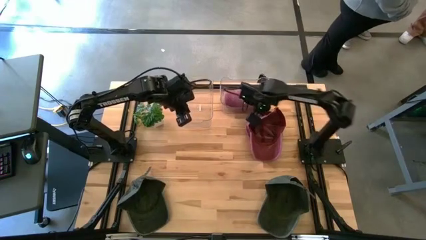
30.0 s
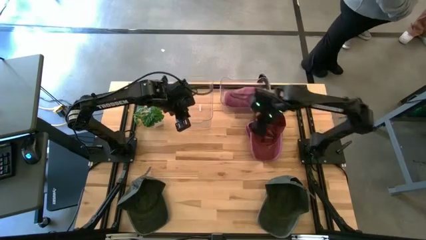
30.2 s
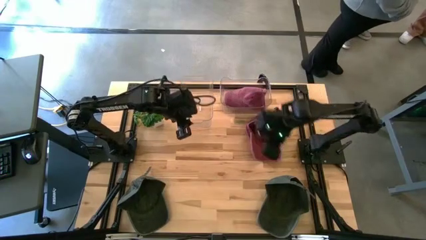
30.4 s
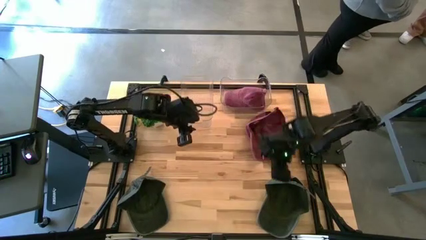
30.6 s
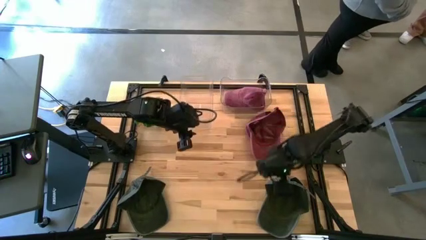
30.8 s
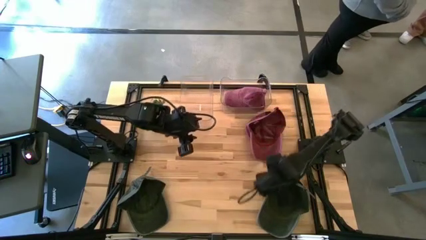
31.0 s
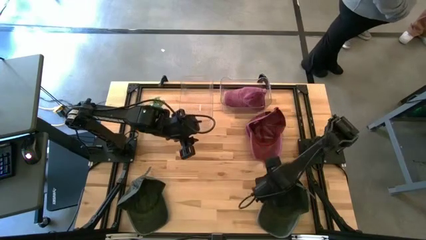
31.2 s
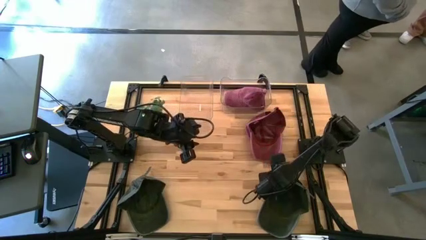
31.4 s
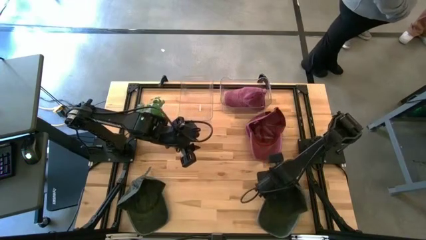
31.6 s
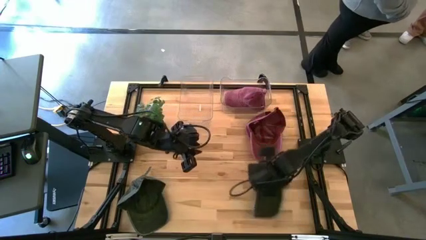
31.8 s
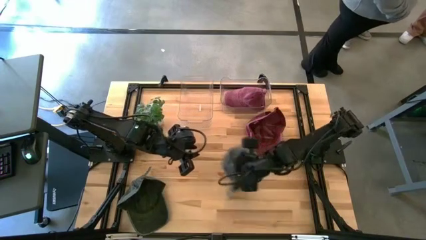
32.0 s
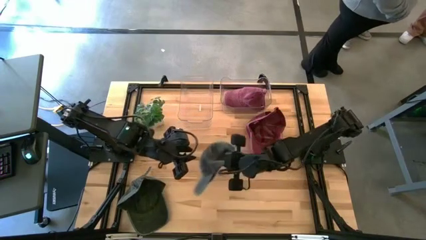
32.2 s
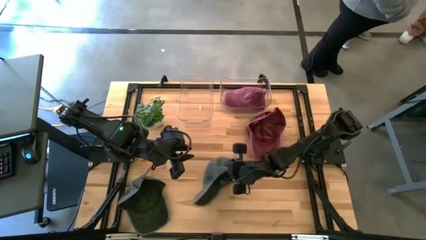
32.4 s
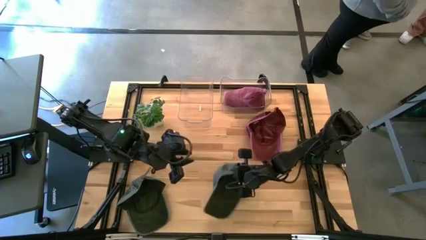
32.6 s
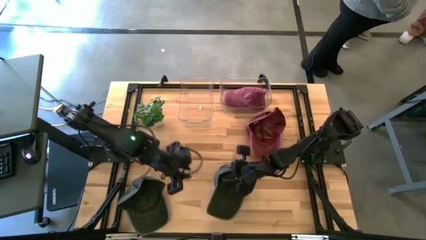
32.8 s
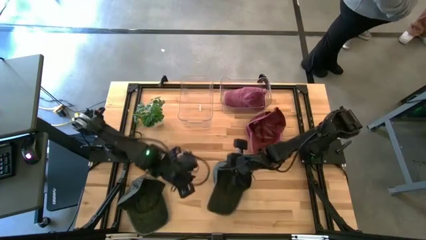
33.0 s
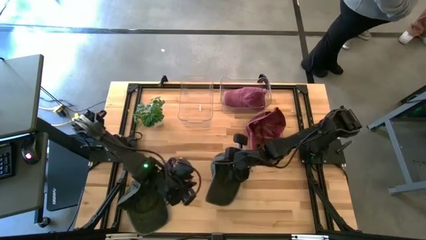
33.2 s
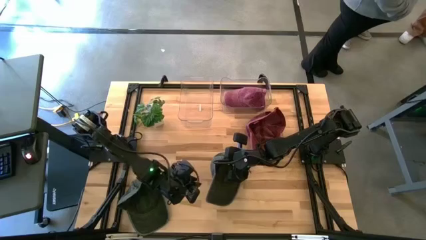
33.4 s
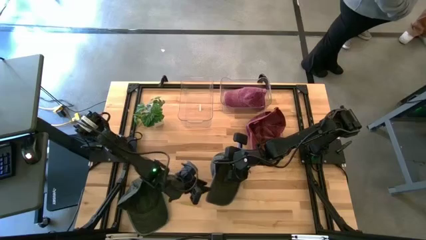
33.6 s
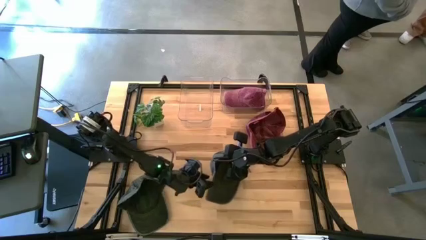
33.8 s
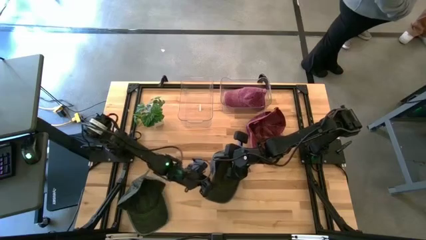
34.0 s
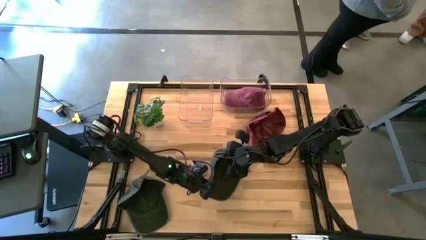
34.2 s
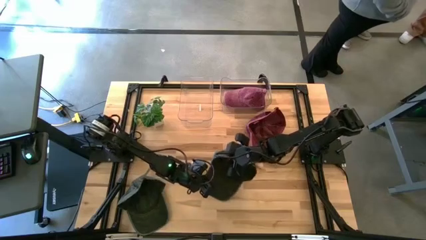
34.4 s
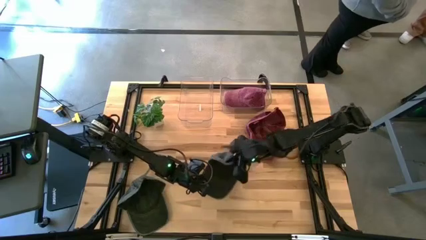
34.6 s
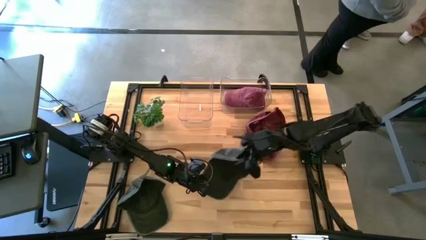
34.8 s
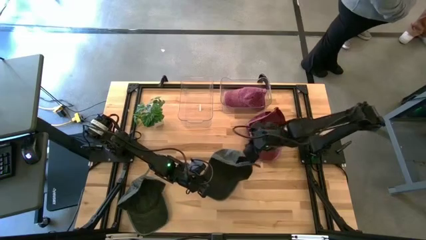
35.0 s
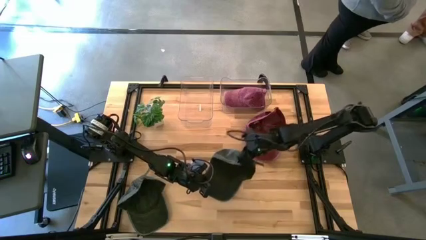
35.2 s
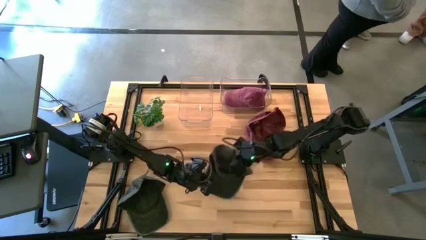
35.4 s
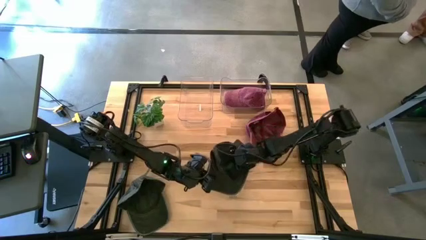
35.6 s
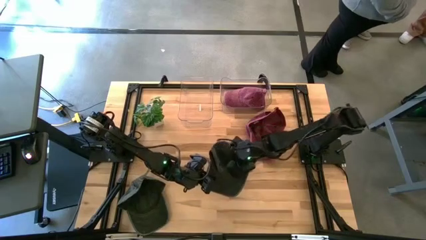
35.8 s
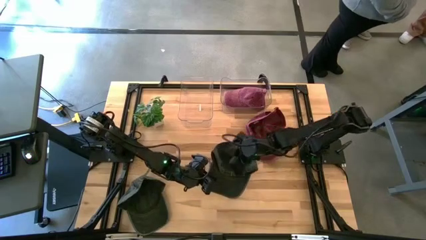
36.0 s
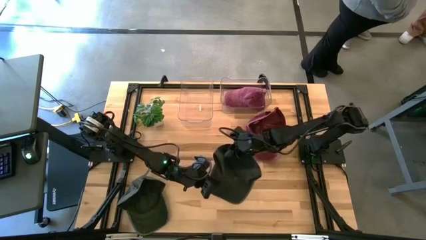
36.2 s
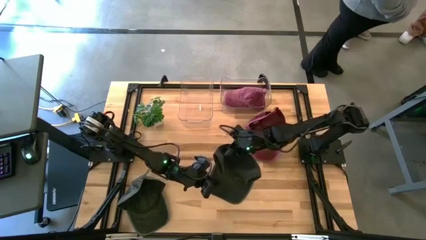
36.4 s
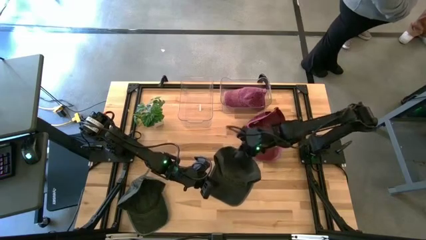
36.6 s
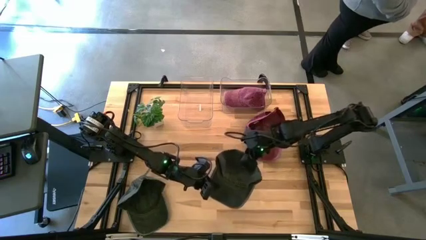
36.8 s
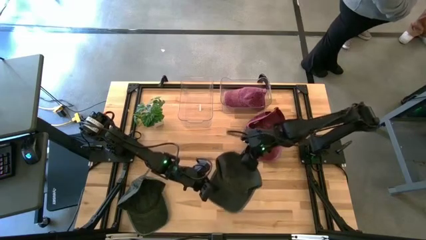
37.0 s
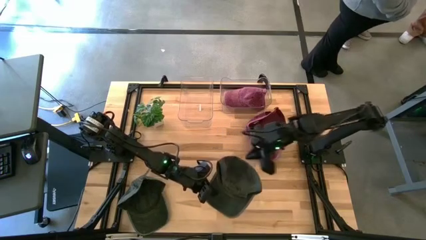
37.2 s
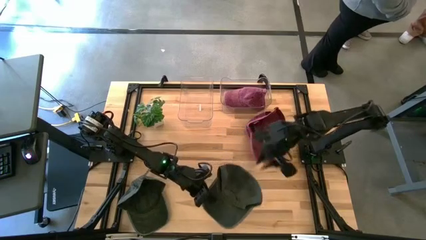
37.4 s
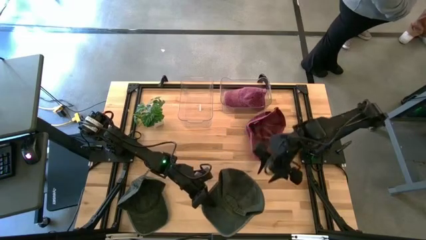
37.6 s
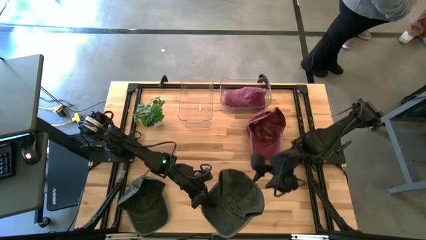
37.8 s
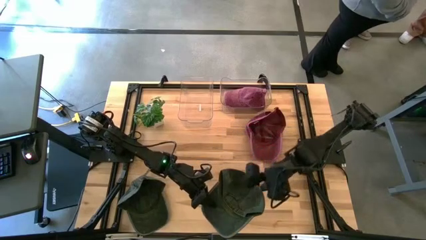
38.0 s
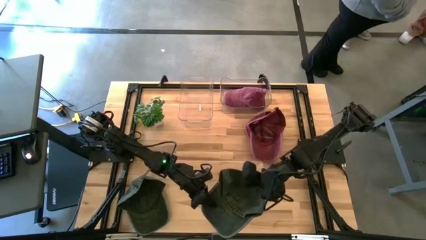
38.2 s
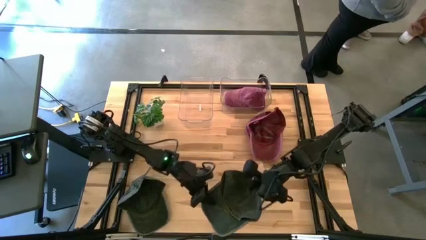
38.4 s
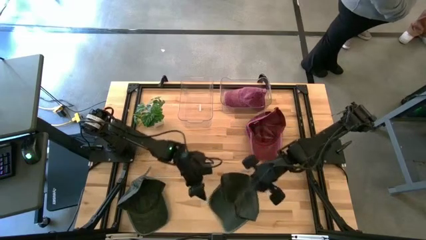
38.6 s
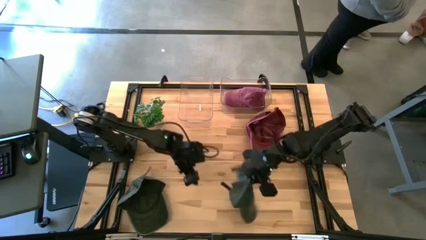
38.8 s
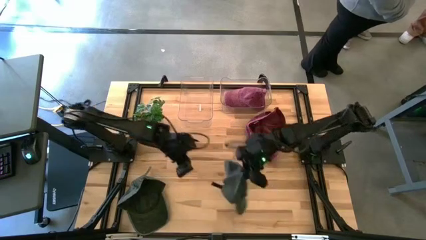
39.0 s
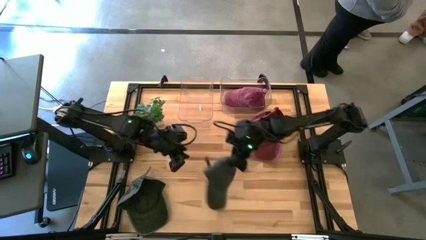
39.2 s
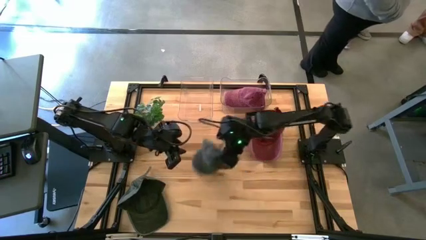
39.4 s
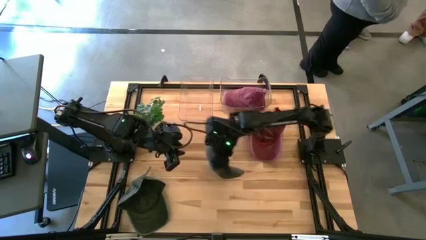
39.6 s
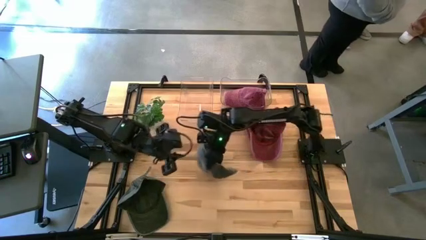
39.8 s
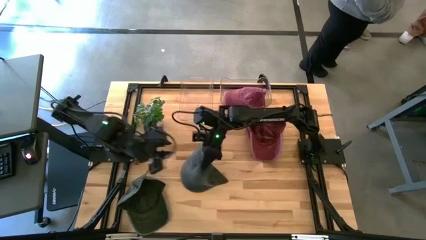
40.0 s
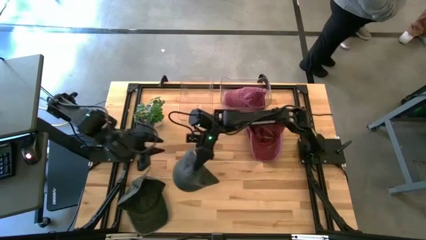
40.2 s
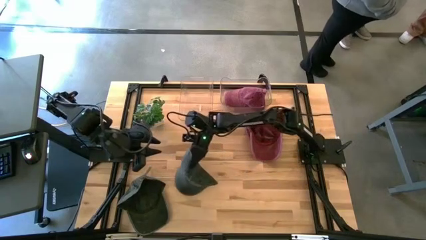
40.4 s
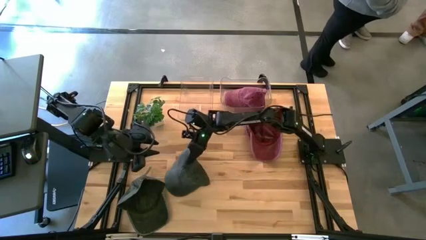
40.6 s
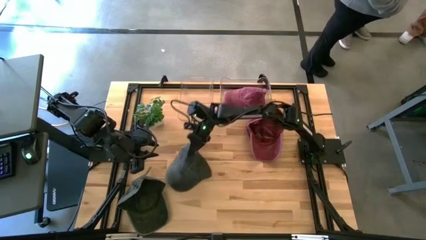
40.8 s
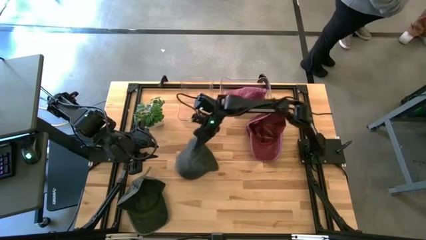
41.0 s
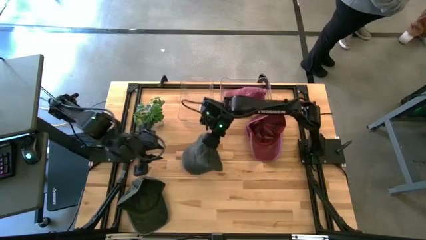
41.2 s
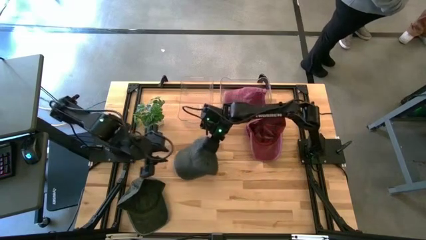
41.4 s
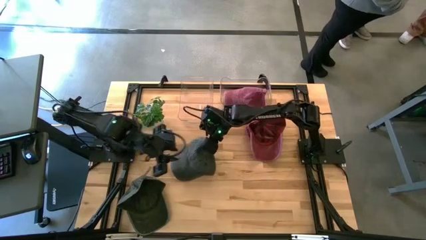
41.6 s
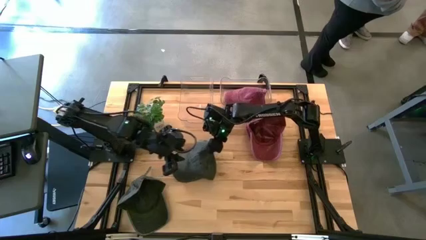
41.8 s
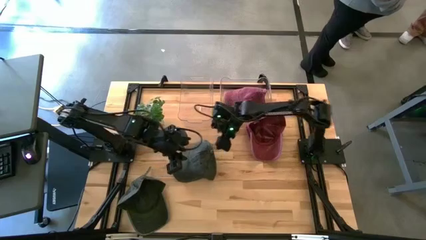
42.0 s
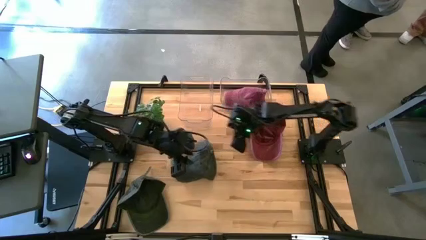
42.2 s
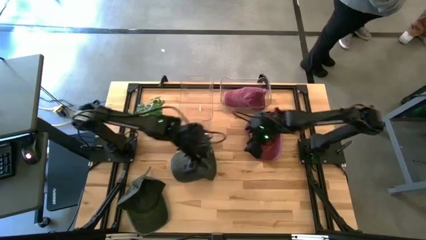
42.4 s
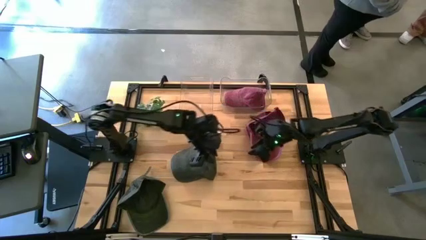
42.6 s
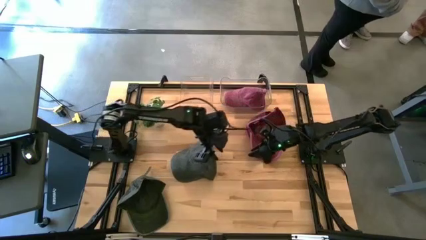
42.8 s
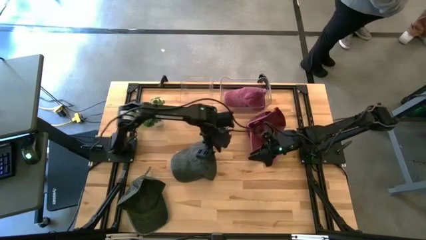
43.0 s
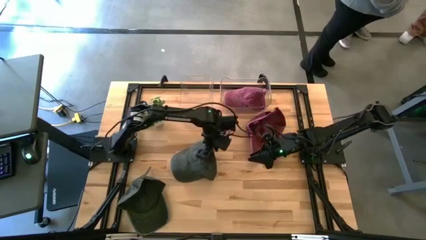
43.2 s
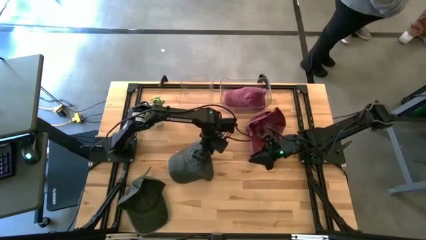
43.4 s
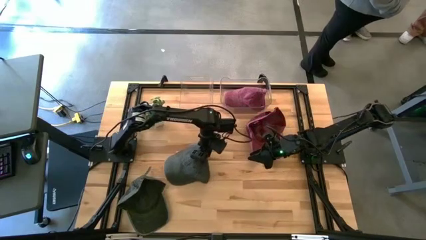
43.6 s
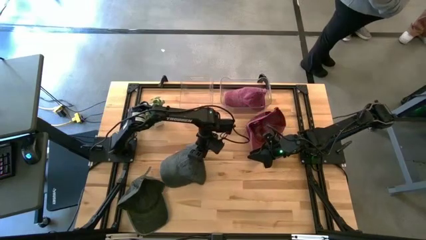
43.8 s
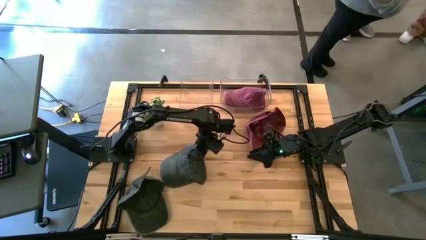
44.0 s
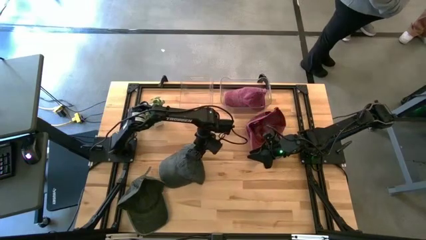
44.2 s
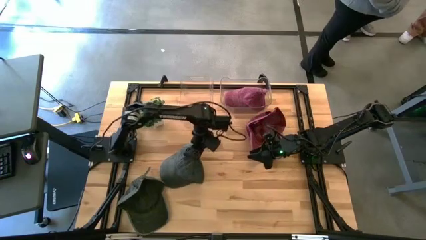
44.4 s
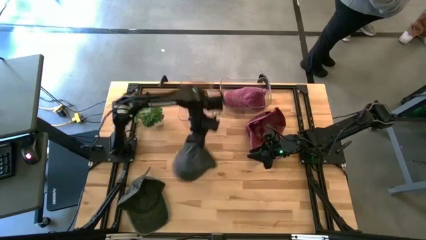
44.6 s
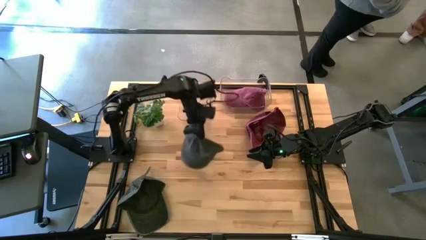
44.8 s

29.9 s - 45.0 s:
Task: Pick & Place hat
Put the right black cap into the left transparent bin
